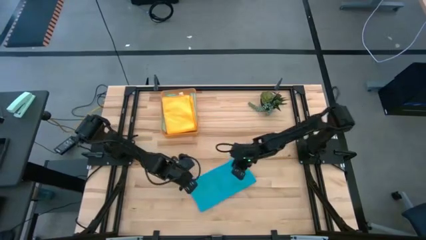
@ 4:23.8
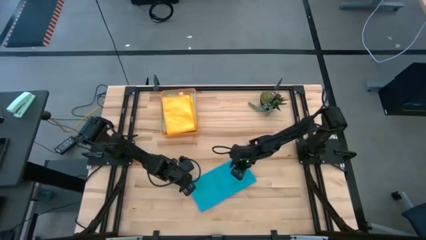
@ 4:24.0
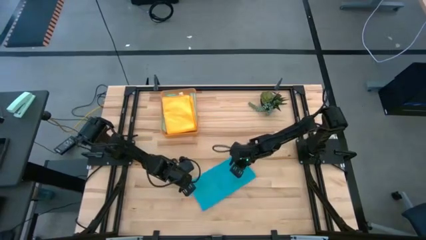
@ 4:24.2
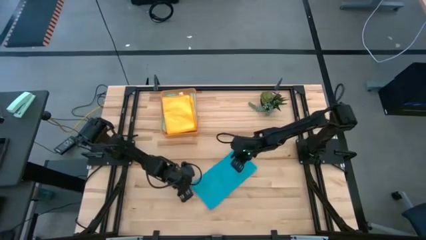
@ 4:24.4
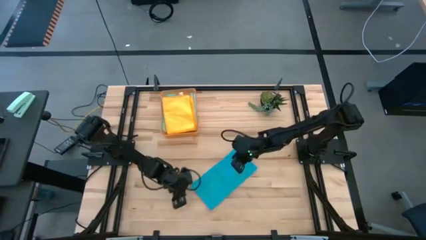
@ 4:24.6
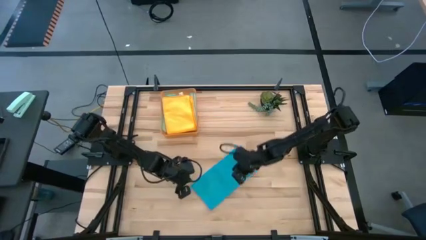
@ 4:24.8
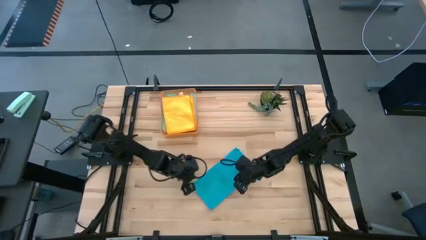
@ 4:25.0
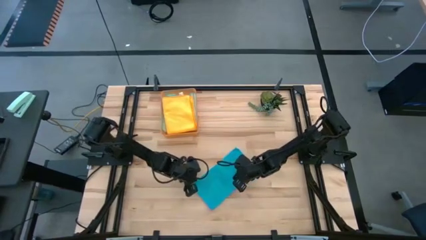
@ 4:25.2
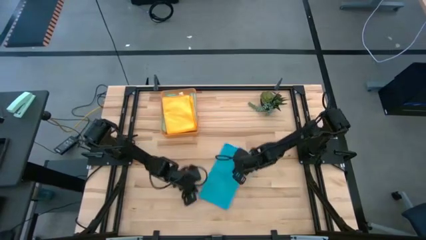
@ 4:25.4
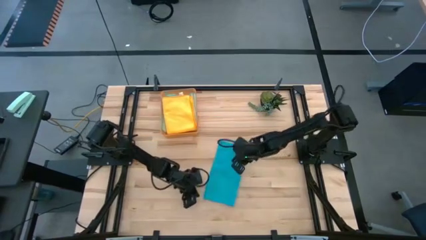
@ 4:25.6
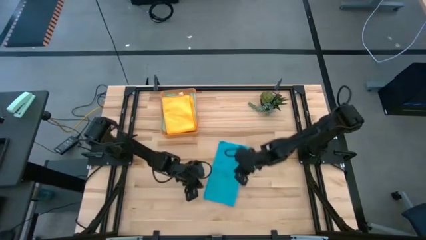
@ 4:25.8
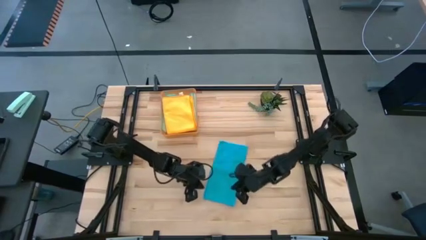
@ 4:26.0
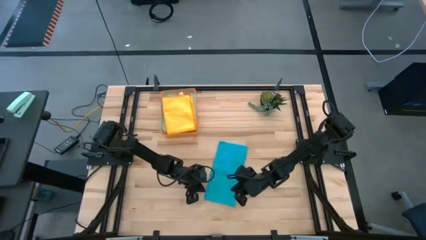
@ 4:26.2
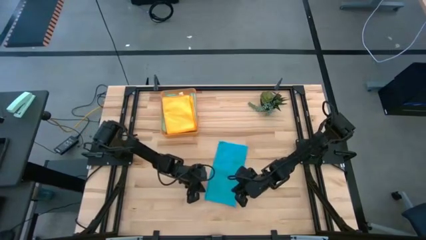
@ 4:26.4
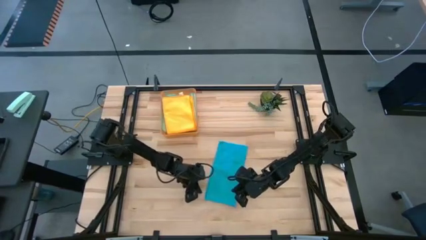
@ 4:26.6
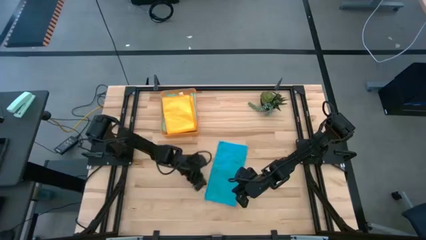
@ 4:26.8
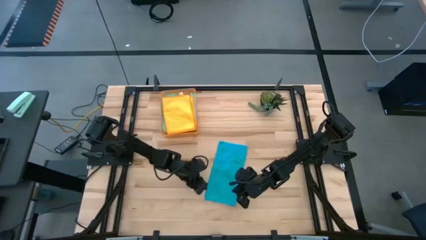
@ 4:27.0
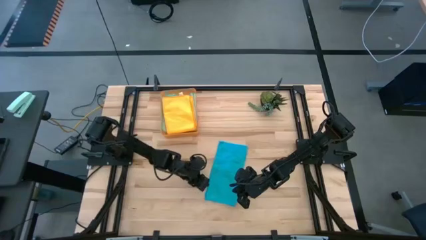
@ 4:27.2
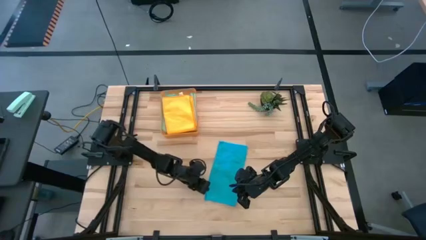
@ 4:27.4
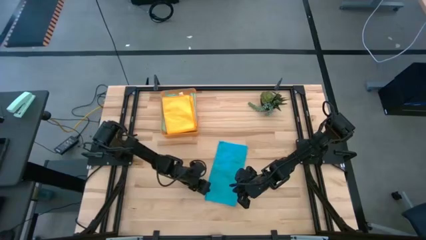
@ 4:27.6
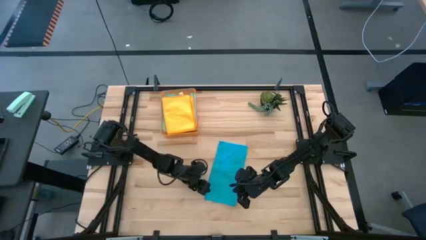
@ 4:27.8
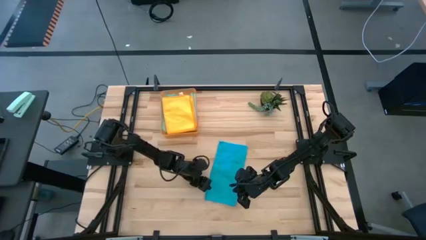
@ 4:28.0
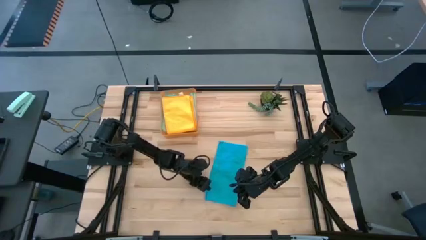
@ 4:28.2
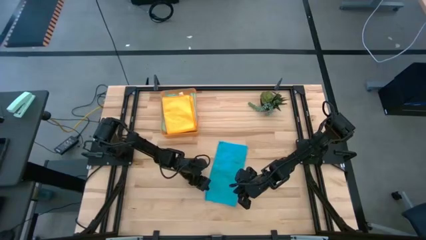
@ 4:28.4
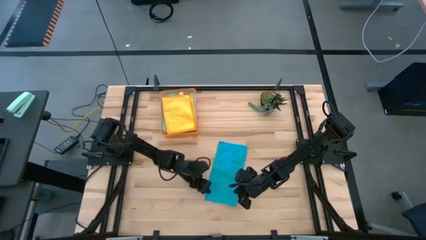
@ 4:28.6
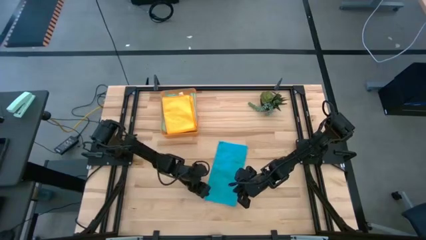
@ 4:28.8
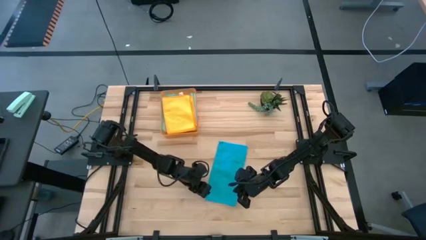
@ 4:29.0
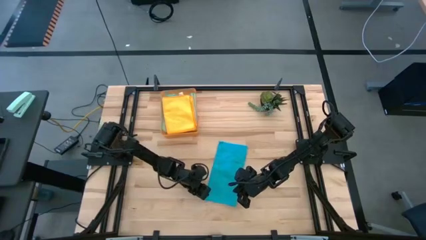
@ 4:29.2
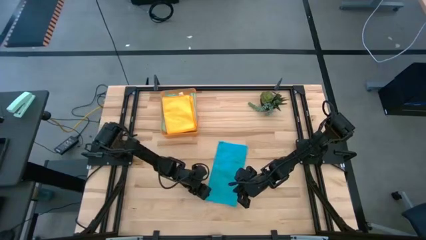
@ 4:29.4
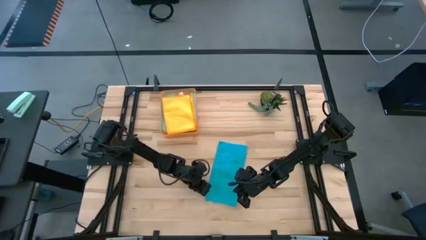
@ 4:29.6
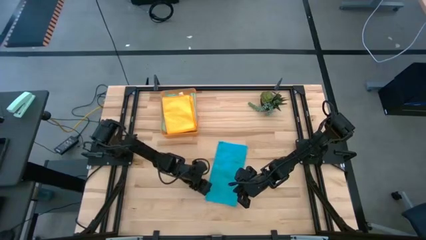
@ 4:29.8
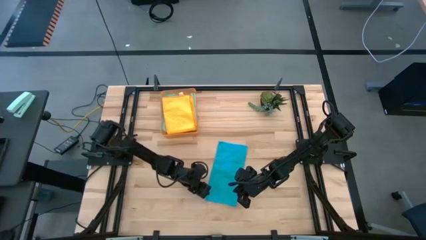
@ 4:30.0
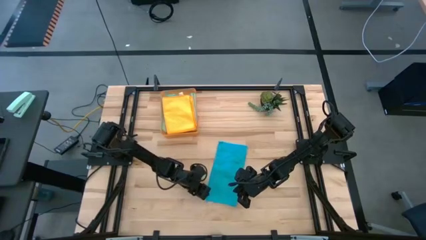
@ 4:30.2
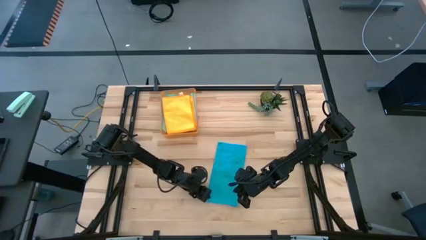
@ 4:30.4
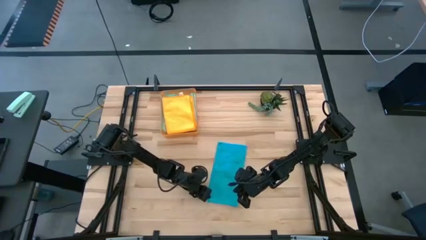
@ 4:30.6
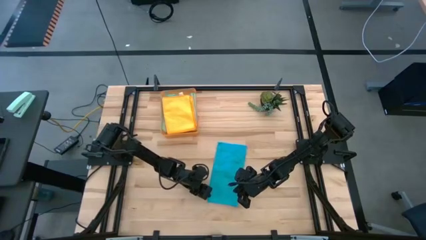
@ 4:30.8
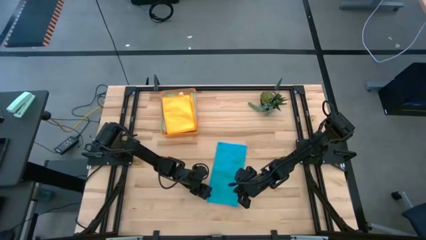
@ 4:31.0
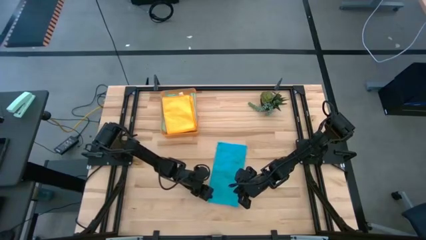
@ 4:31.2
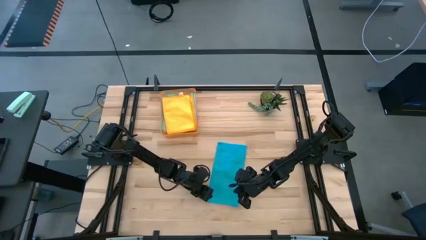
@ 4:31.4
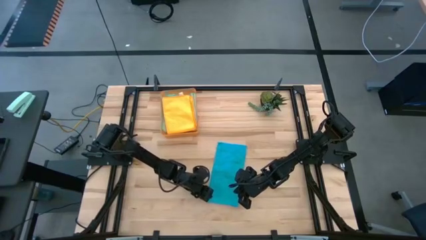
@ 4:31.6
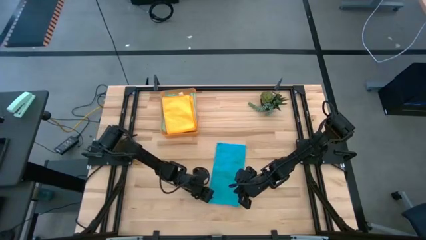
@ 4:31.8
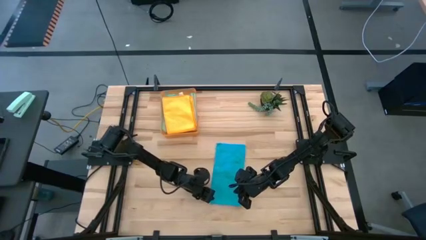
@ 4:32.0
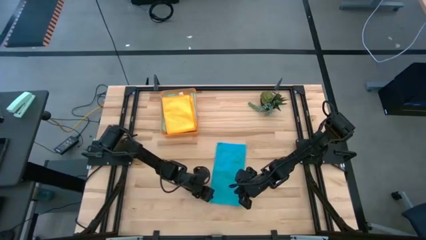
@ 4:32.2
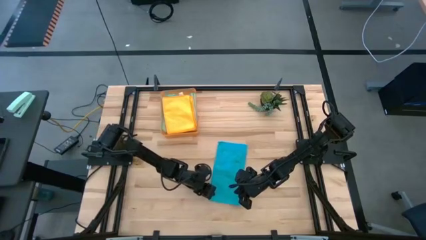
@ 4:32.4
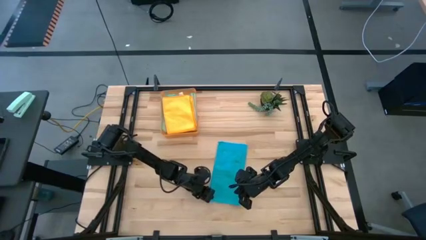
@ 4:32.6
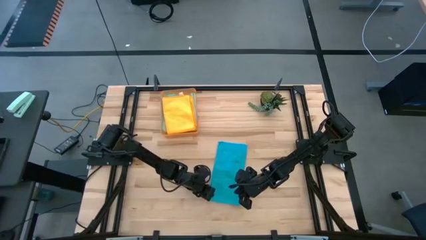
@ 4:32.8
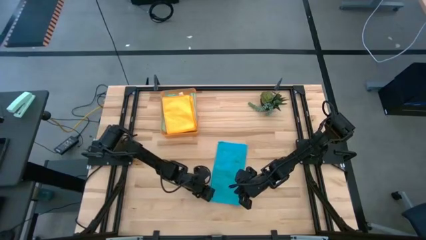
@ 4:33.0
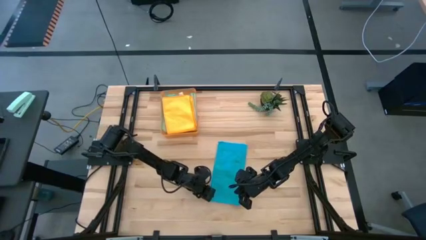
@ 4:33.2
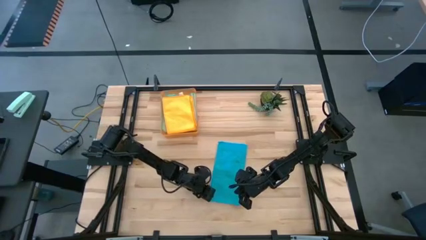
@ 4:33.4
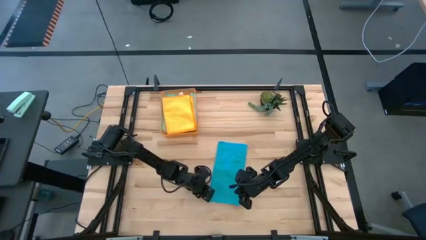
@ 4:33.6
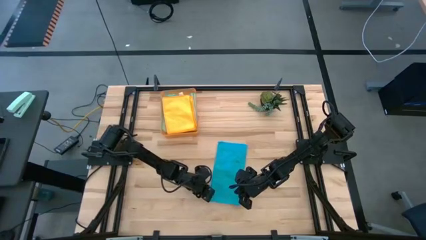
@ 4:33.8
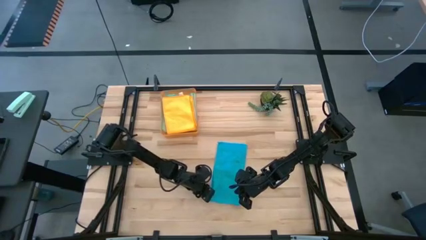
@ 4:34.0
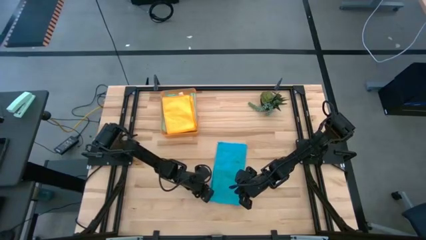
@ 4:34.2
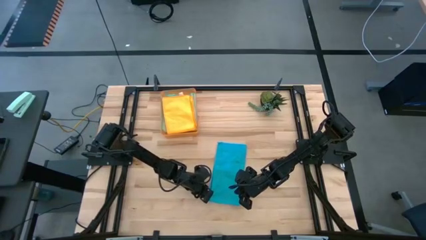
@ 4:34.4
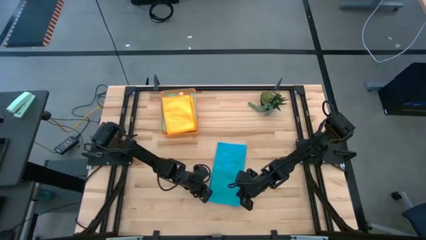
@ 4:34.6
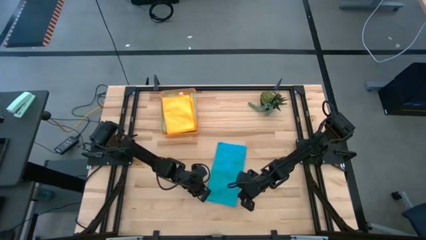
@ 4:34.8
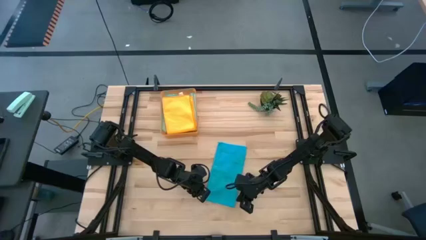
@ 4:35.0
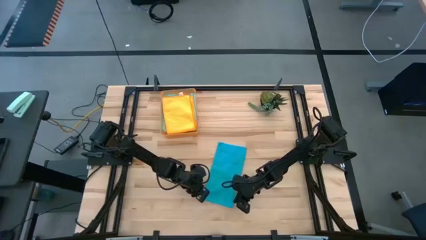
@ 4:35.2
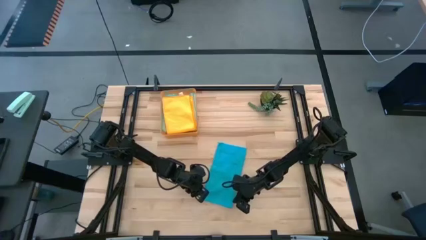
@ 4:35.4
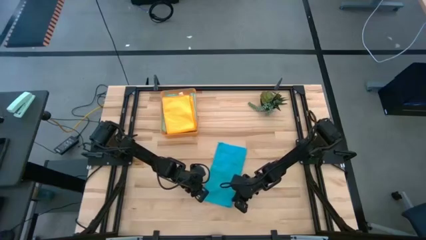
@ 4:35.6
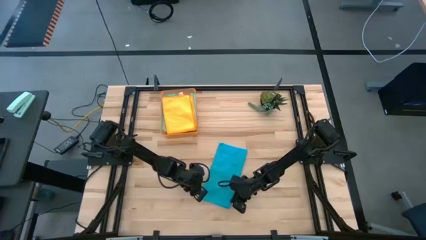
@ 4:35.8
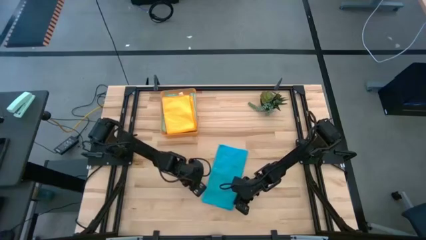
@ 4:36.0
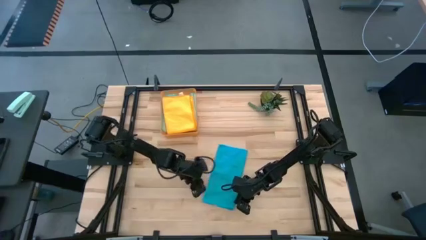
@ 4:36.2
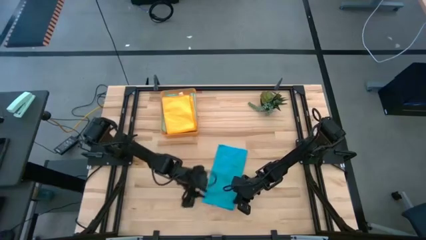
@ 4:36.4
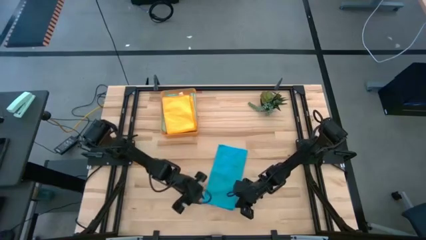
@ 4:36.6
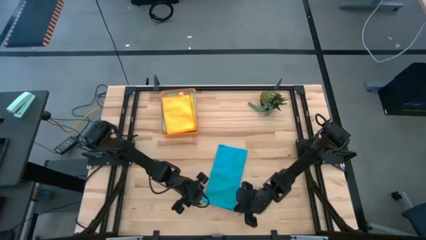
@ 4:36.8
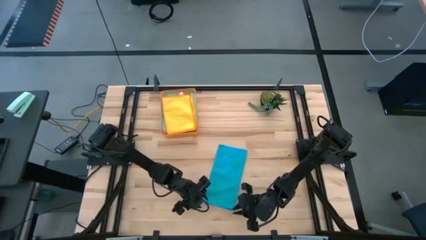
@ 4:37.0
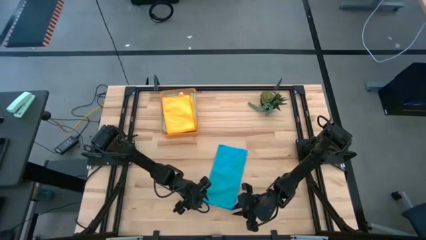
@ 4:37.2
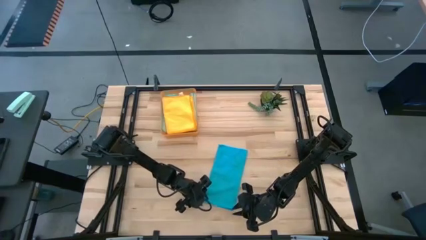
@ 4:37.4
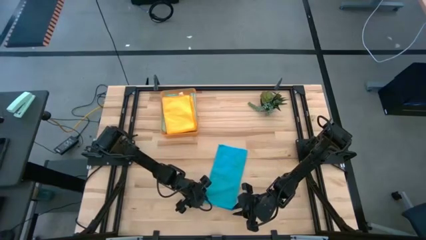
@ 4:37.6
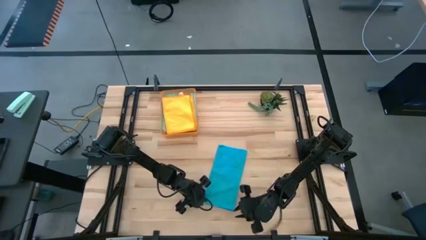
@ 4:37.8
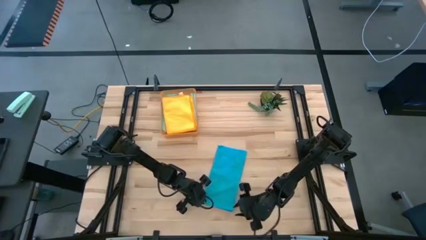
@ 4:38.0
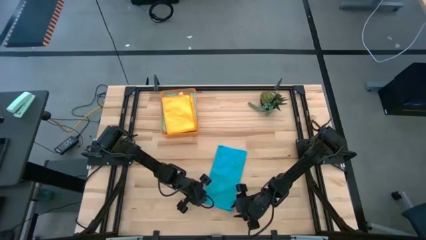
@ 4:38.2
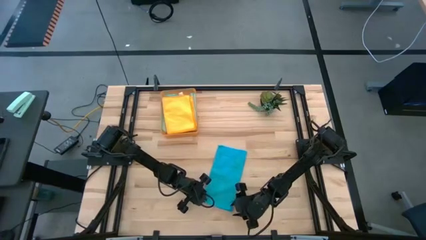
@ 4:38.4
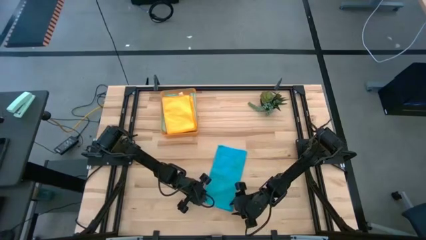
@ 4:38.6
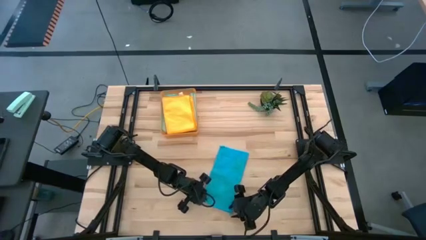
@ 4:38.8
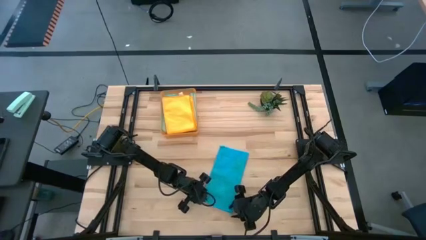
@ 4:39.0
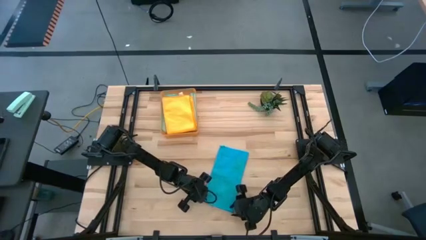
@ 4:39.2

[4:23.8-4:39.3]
Task: Fold microfiber towels
Fold the blue microfiber cloth
